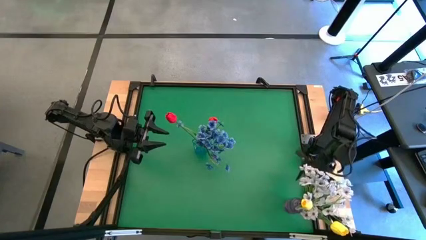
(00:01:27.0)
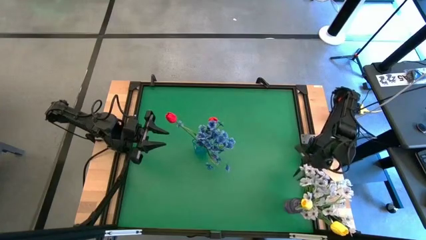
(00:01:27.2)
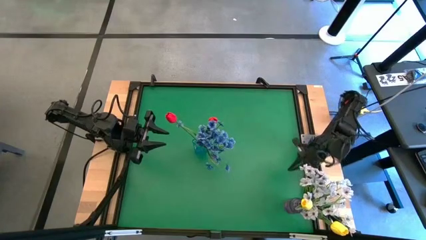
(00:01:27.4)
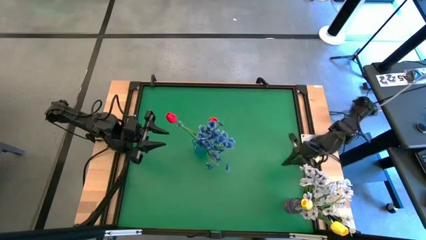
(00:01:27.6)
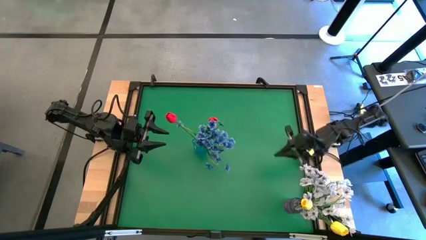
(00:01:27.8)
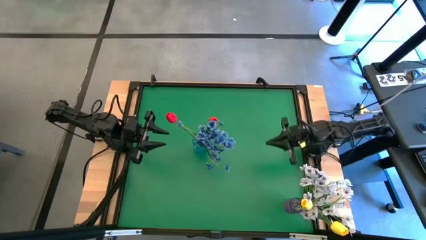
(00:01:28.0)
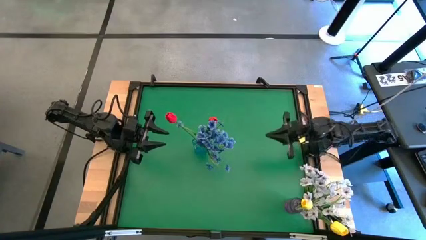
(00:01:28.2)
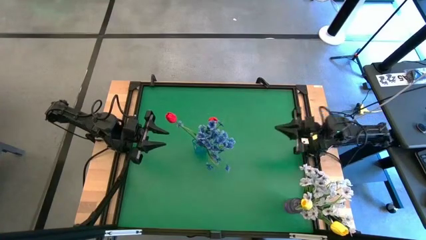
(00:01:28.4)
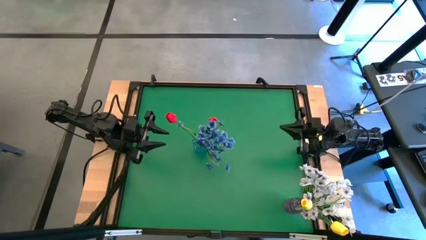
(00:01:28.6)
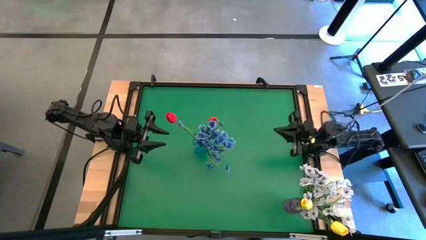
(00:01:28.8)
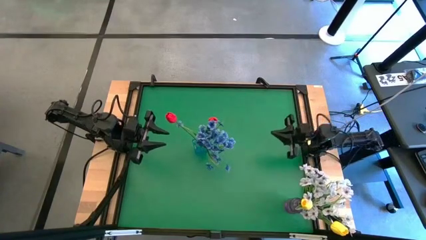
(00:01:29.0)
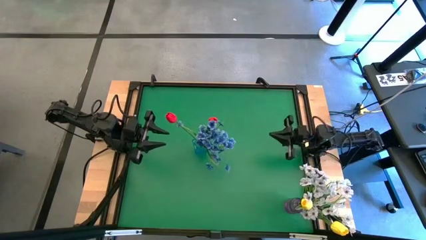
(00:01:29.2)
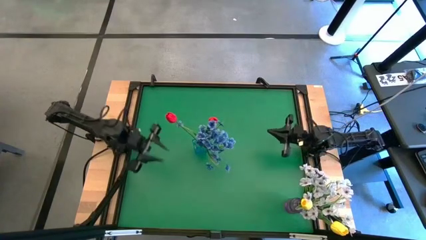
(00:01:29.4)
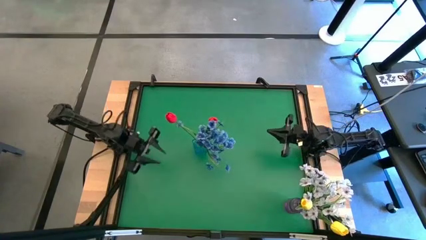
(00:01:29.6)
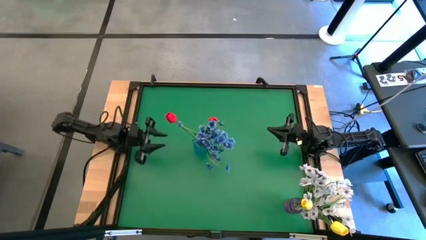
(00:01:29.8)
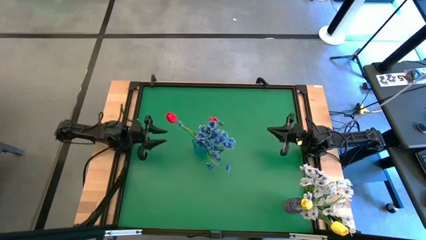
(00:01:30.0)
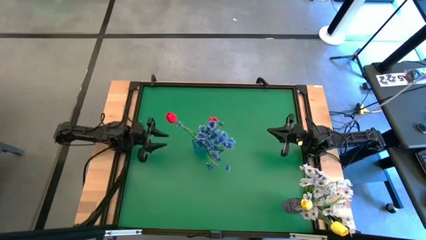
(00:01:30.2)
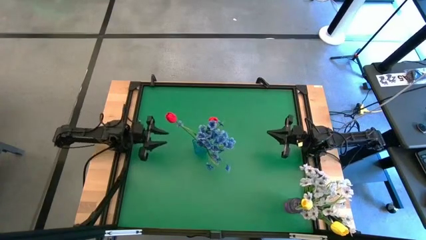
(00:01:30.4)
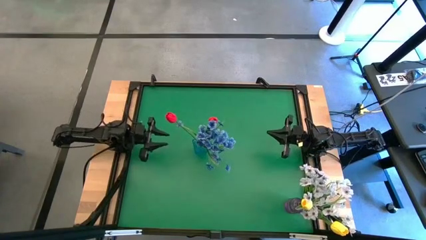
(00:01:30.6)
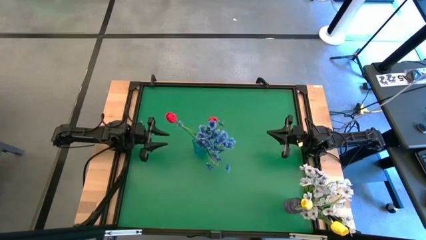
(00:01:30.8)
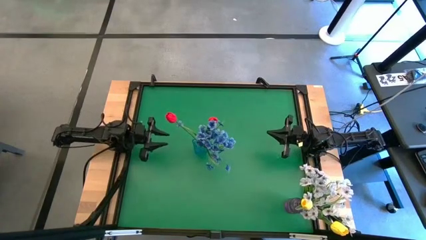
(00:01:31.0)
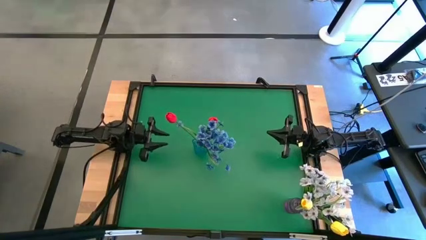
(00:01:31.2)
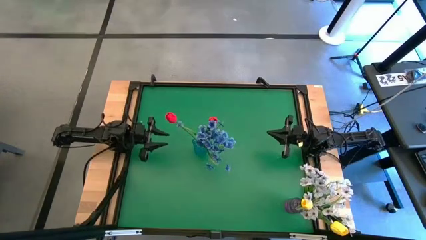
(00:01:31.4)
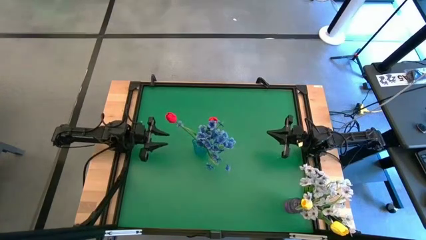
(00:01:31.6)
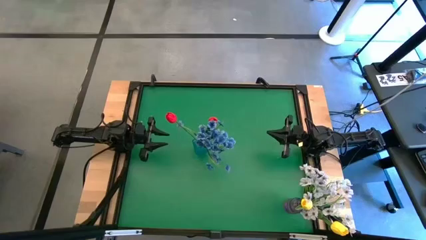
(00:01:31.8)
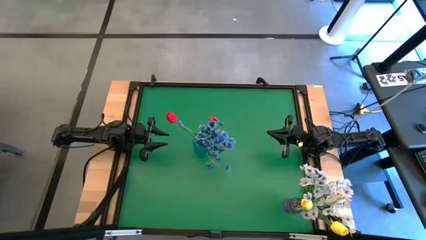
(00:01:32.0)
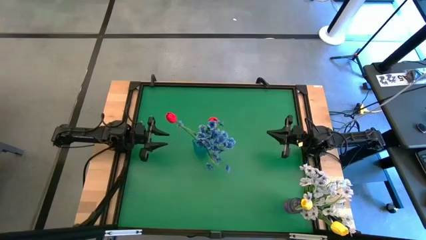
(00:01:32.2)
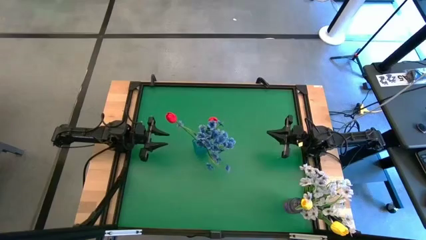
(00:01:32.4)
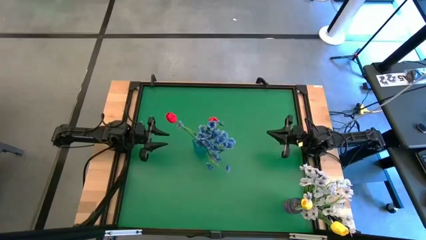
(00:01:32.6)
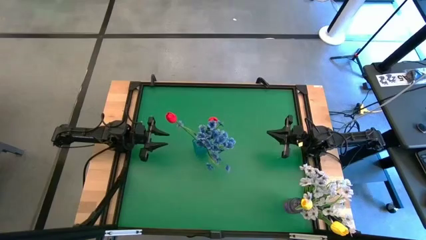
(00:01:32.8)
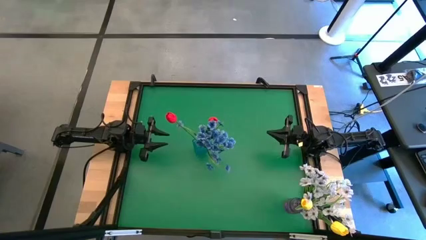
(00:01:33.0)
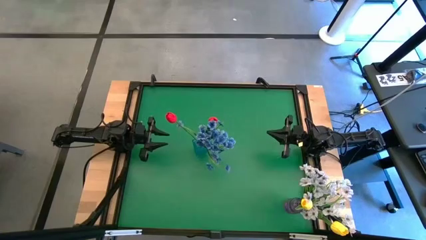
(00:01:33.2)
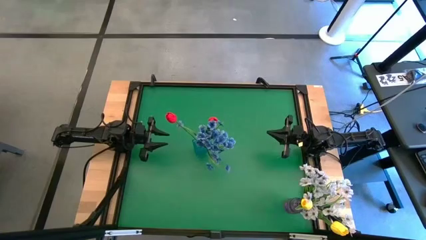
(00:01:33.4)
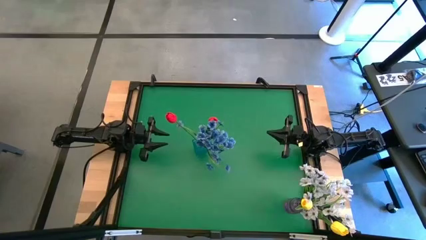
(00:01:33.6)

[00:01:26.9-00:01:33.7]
Task: Sort flowers into vase by color
Return to home position

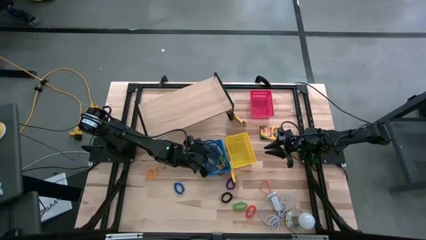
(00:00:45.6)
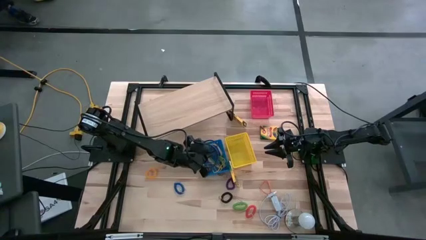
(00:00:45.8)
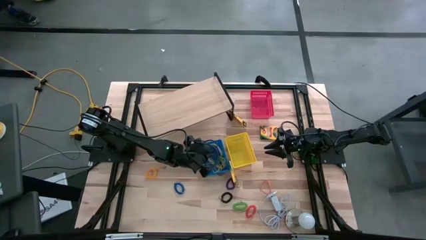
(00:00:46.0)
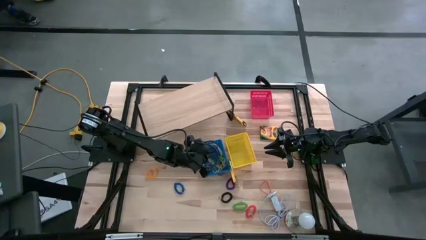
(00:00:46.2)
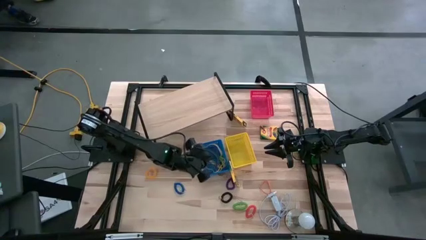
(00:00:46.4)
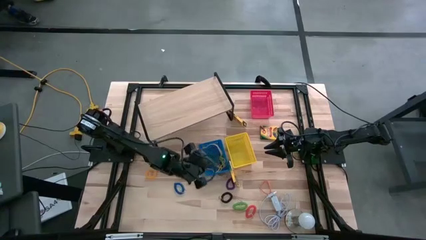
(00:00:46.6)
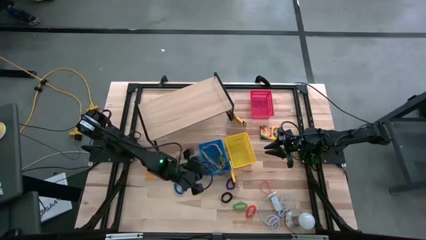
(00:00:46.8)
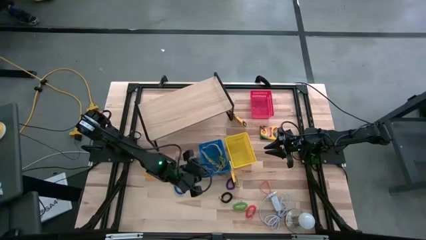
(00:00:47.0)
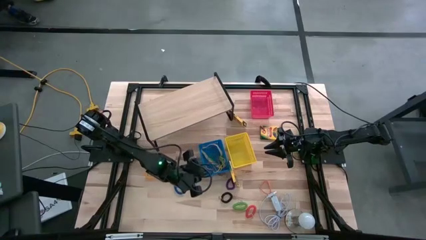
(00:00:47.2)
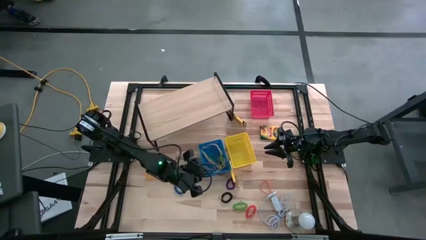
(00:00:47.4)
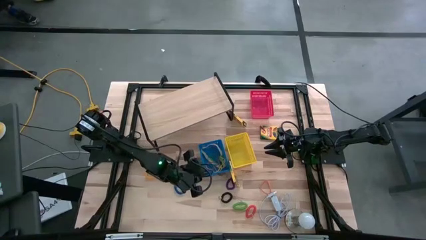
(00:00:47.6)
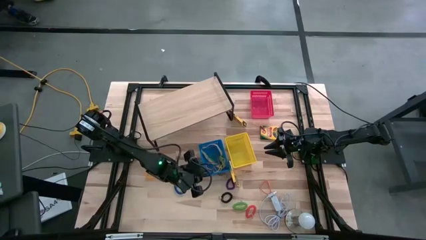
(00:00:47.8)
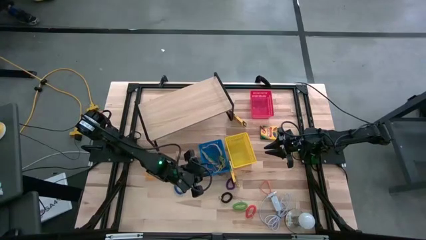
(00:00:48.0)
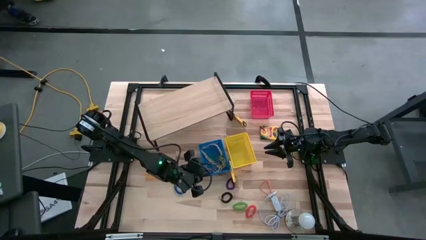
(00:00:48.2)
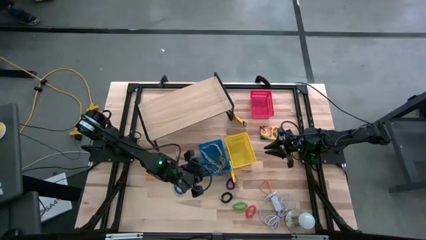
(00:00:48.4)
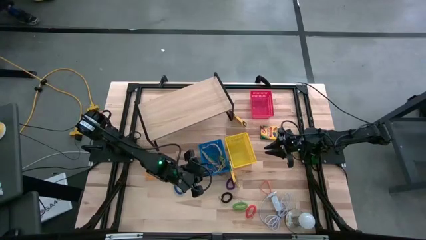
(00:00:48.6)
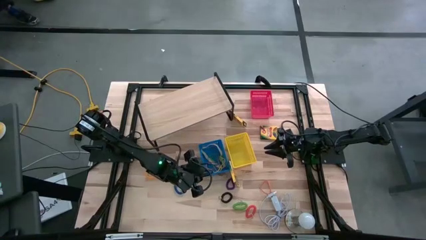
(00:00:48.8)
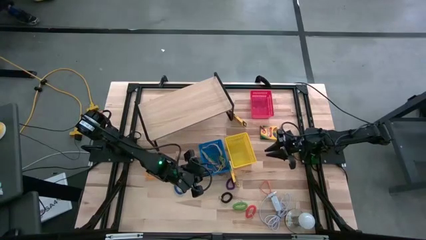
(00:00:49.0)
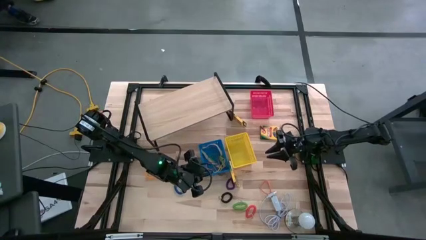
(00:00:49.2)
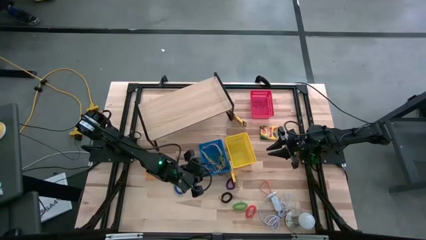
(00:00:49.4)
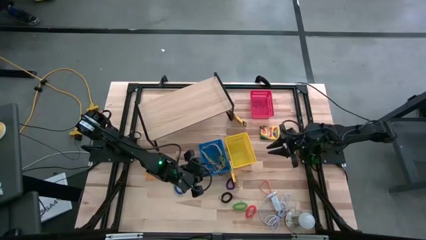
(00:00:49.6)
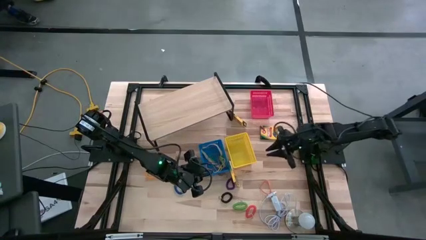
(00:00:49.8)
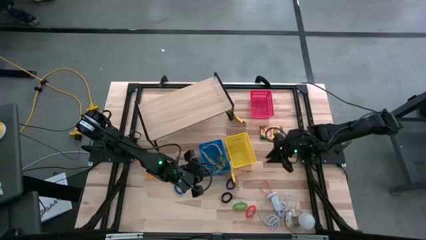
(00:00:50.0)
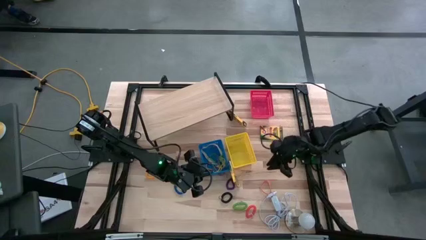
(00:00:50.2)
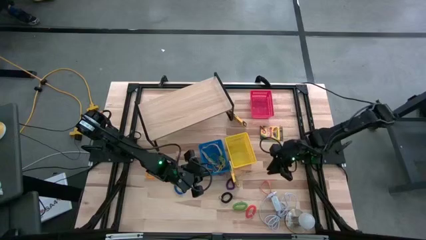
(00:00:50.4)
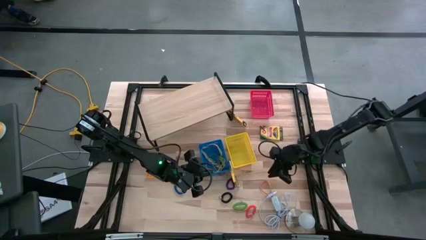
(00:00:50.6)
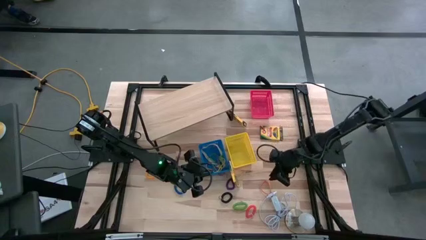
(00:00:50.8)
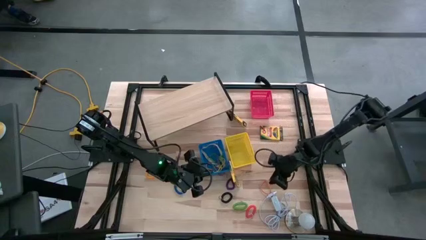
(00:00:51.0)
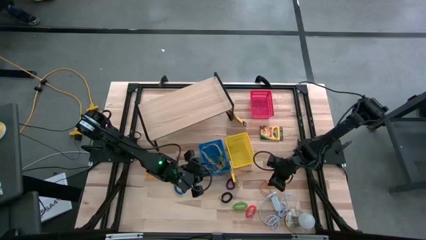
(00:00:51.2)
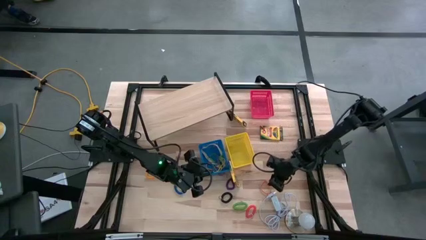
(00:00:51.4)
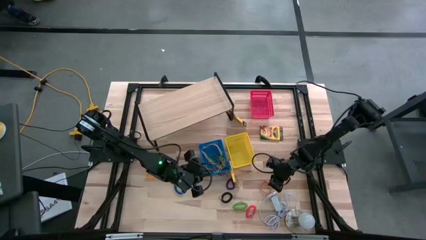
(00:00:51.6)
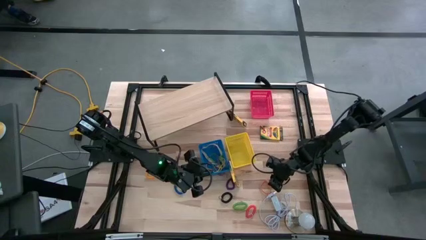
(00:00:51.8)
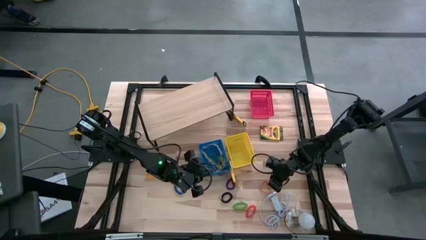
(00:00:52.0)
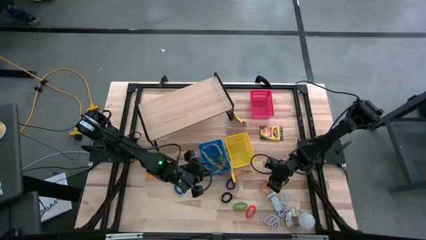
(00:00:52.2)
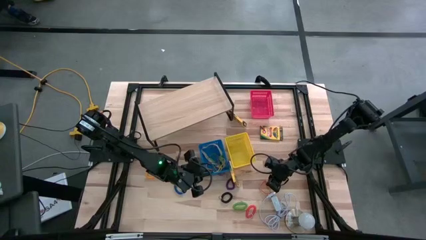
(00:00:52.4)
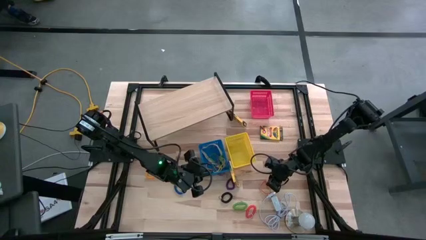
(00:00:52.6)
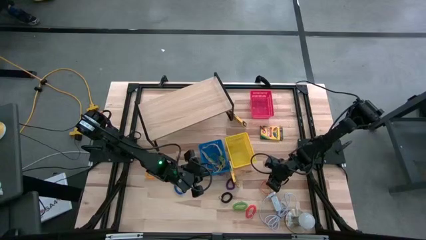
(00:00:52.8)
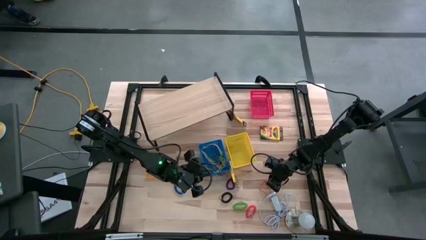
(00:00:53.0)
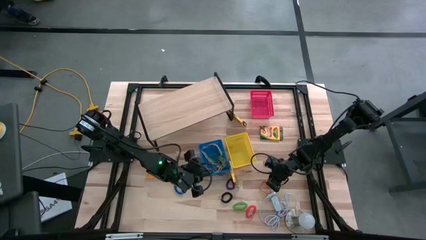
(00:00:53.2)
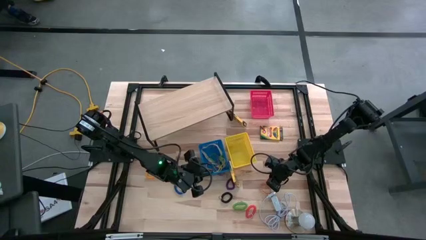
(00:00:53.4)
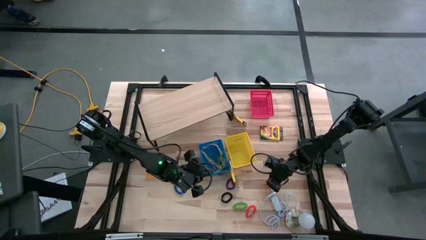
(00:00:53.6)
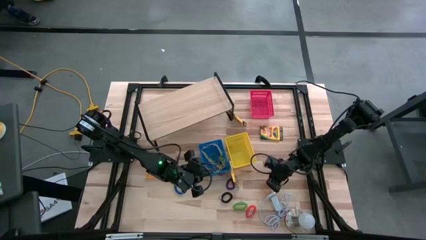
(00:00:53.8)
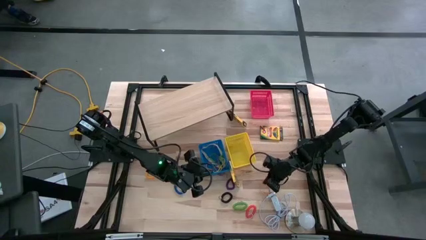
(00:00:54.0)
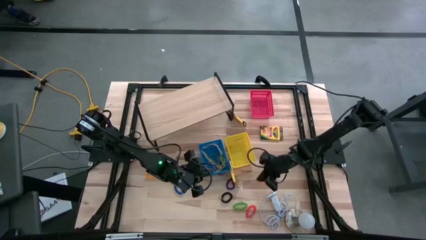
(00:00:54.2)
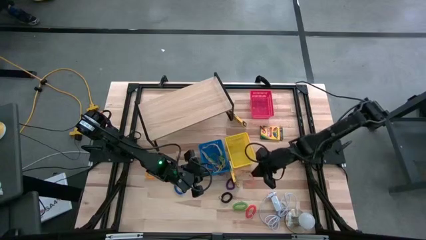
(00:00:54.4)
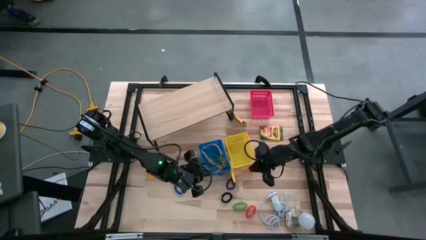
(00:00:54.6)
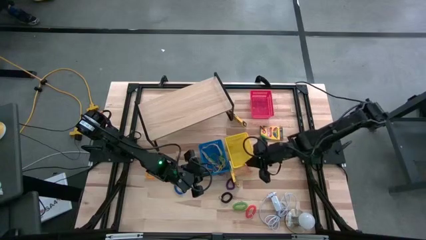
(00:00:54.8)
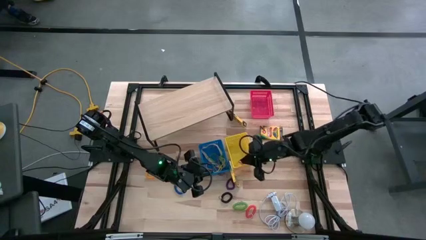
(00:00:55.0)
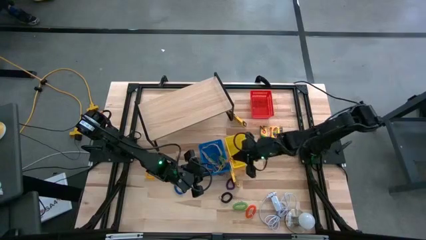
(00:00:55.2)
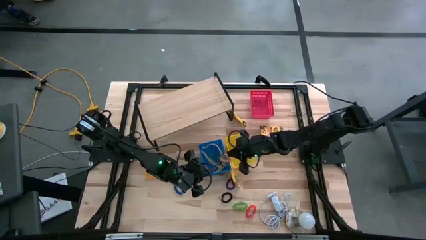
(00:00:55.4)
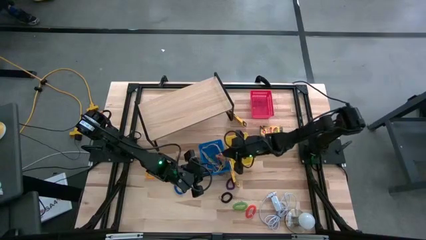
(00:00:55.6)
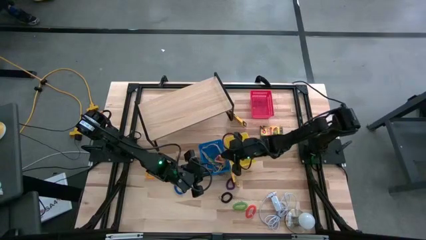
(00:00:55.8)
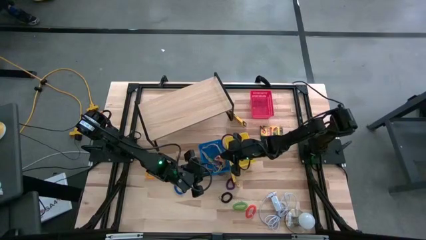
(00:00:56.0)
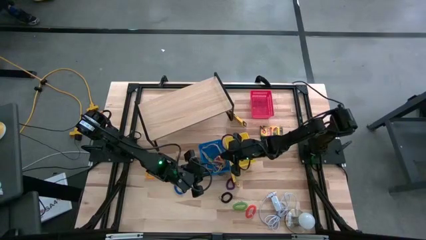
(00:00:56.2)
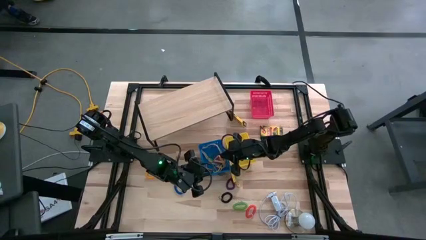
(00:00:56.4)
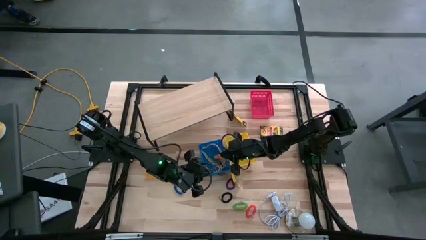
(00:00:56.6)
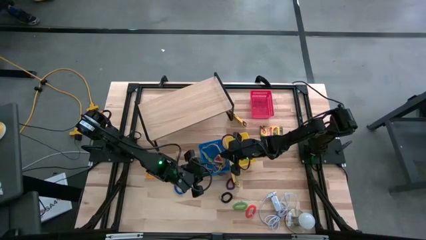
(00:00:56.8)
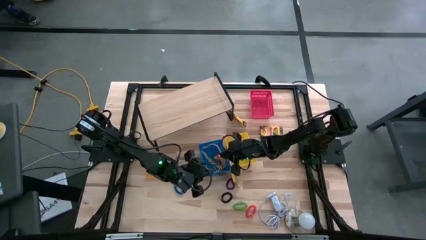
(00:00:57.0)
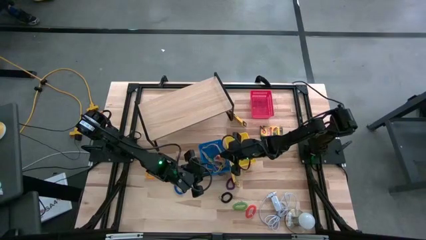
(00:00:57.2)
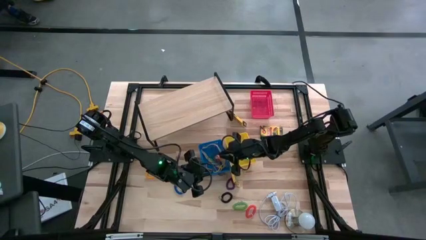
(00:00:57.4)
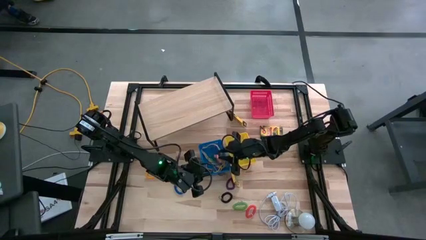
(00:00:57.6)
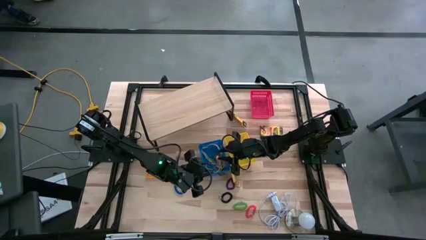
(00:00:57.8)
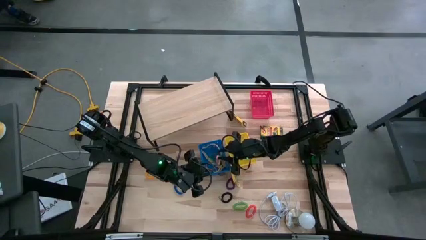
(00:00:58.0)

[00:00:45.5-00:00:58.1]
Task: Pick & Place Office Desk Supplies
Put the orange rubber band into the blue bin
